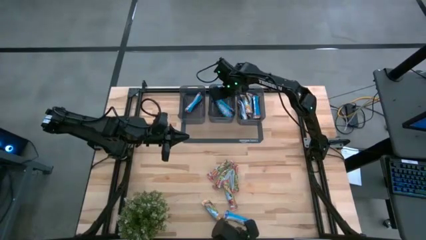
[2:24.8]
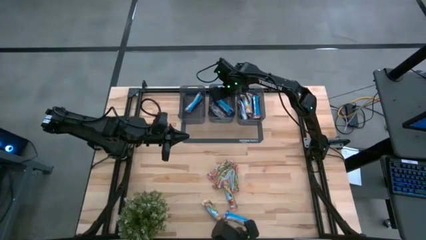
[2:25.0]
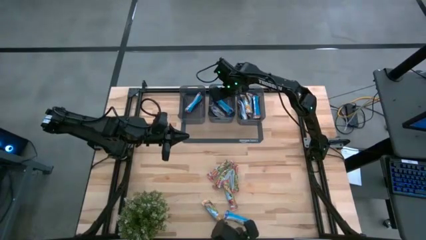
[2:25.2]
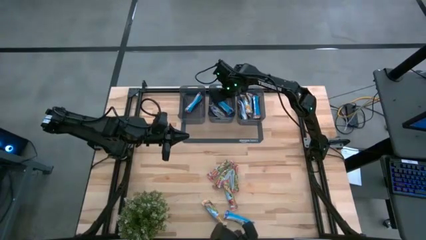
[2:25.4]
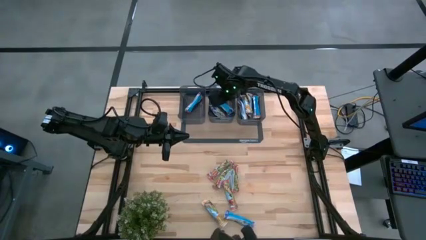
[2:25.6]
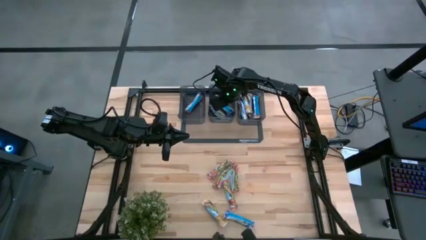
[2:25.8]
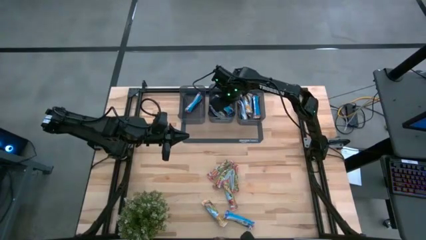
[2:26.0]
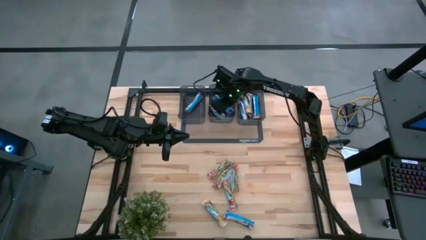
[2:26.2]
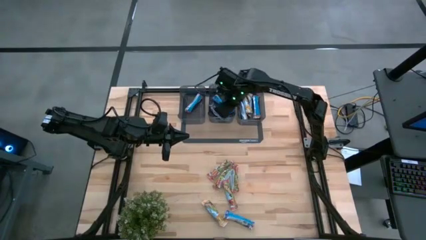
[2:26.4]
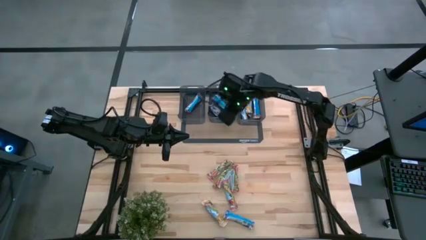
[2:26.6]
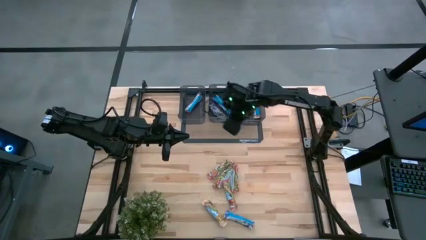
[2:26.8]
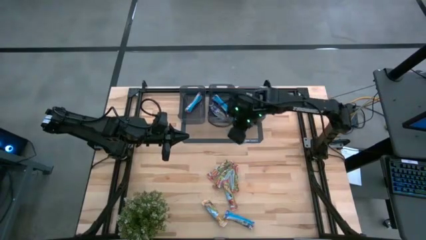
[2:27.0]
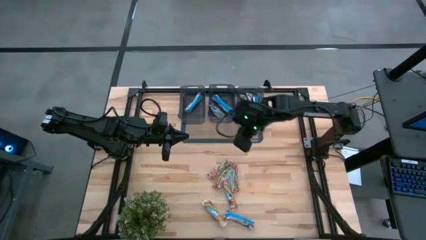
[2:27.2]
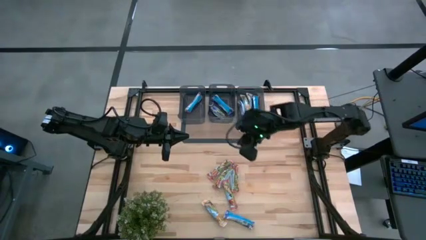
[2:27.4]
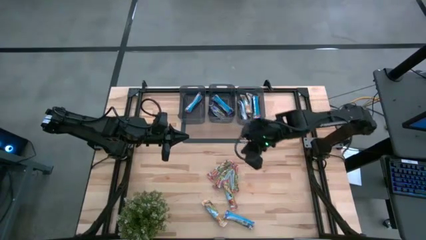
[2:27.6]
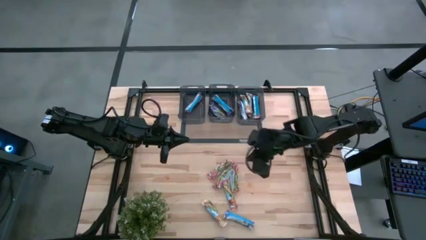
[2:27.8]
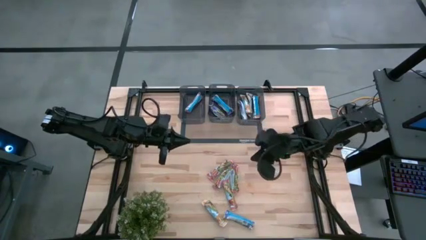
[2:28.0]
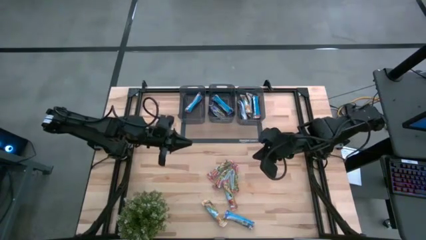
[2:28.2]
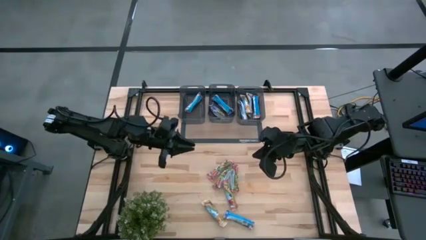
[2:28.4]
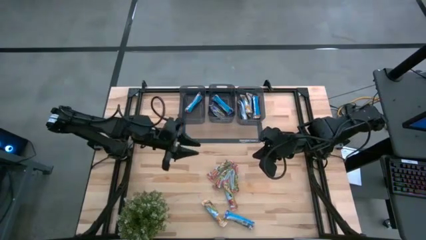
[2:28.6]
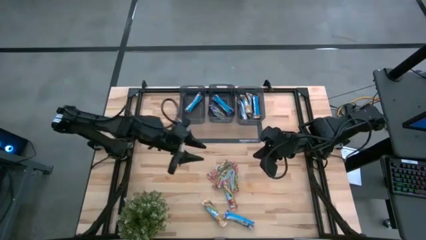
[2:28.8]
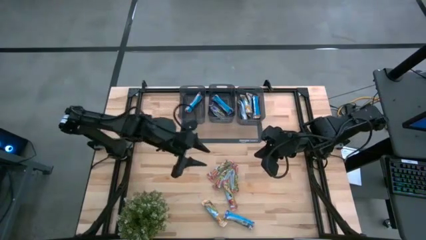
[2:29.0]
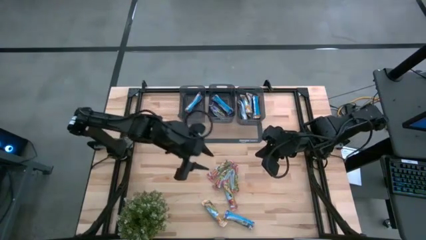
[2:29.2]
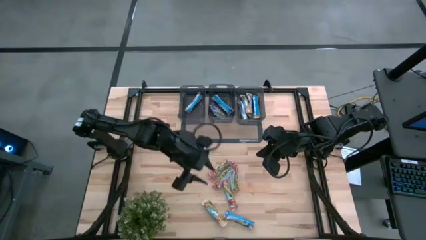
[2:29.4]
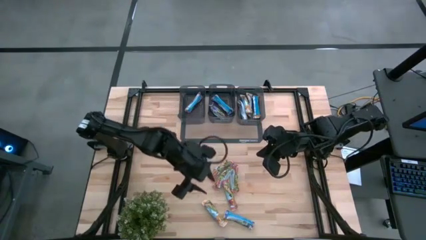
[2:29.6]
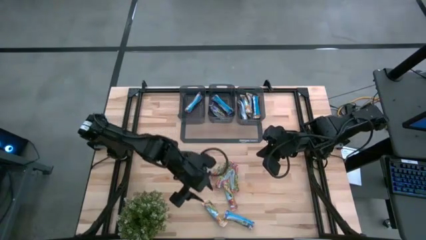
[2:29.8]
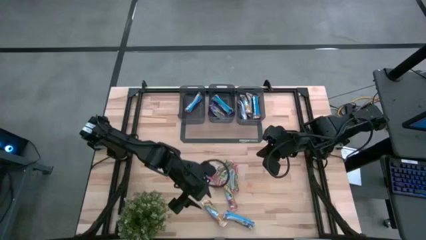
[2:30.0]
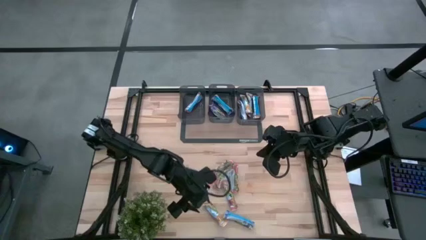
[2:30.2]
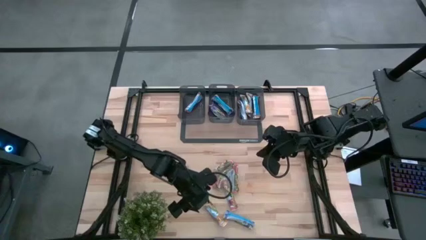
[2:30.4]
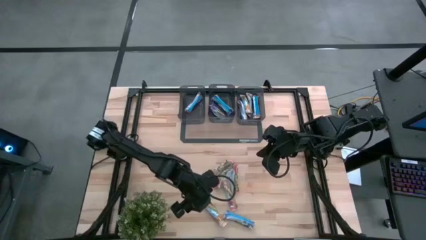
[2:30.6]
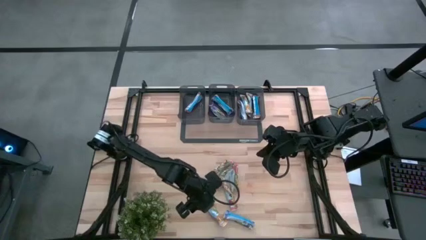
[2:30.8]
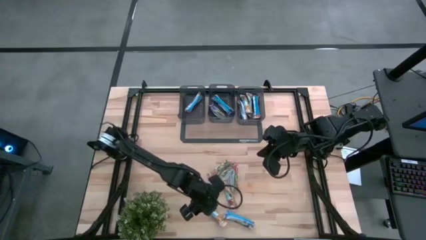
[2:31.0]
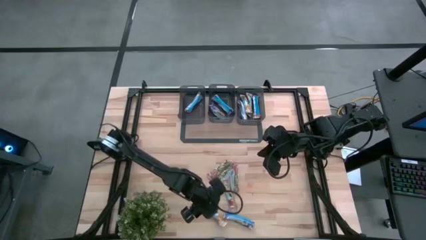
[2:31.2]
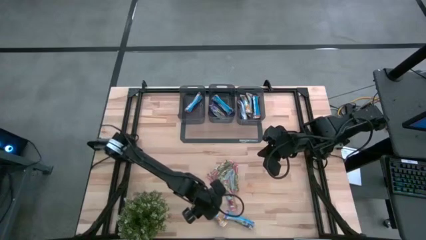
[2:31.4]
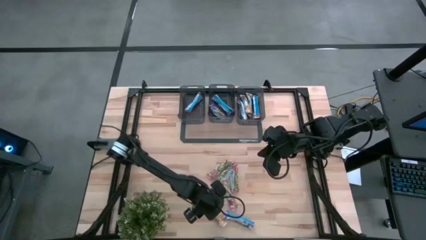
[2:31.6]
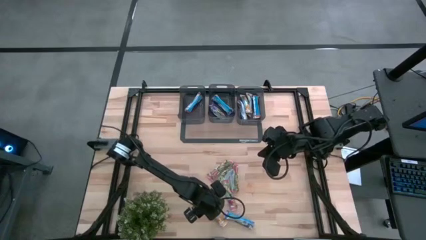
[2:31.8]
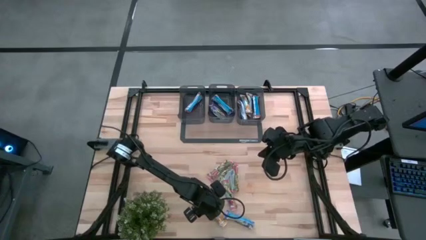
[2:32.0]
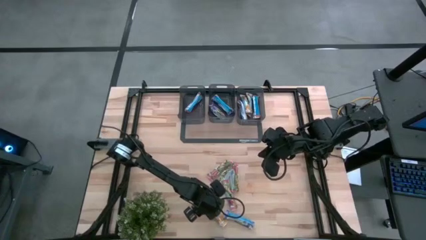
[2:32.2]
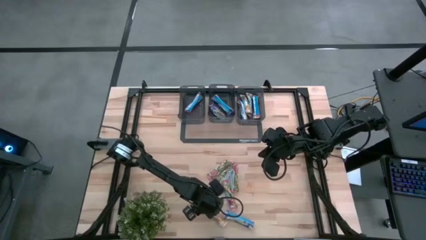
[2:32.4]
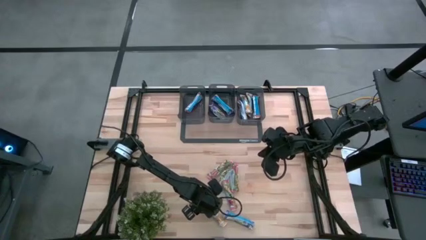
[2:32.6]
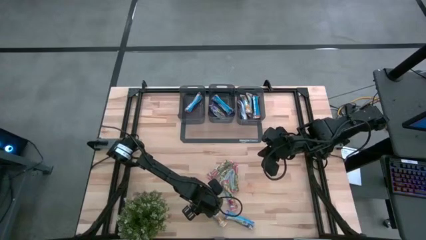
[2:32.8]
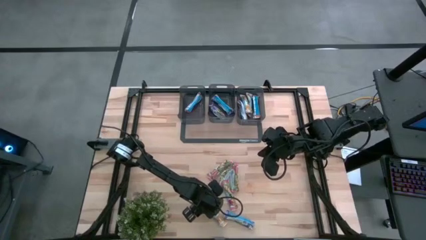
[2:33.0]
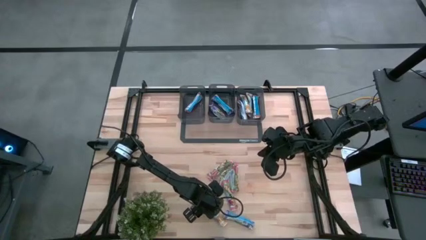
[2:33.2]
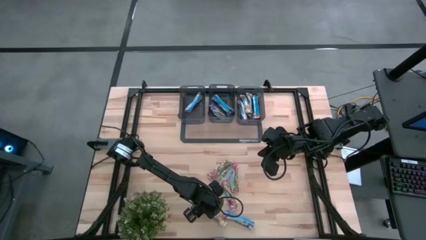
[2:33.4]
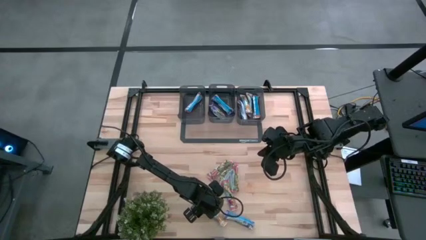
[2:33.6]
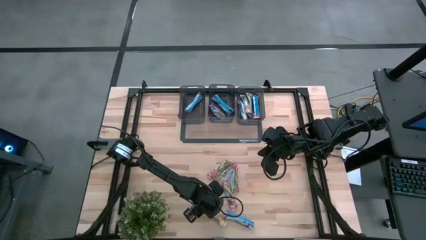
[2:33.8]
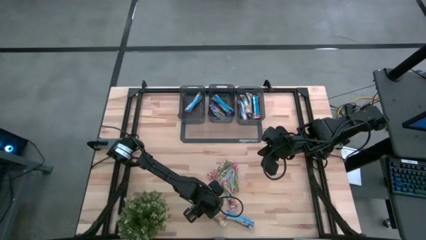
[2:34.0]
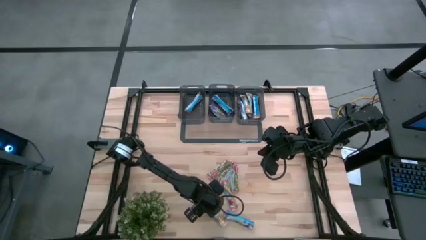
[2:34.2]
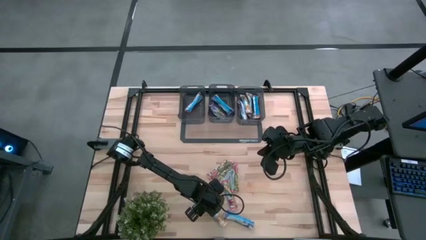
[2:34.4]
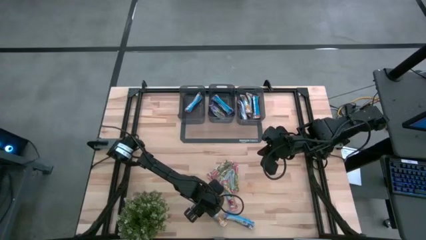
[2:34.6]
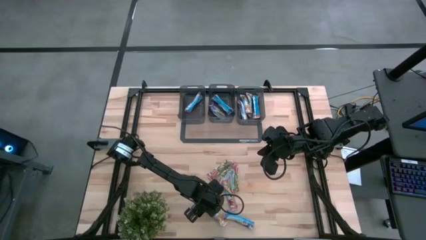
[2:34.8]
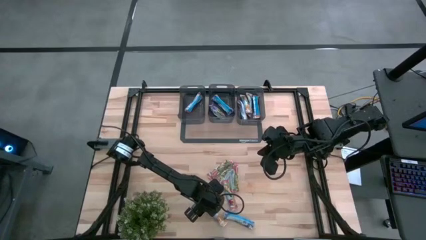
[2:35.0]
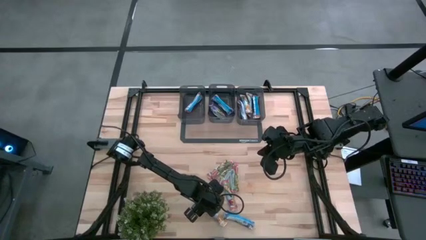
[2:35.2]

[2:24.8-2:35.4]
Task: Pick and place Granola Bars by type
Put the yellow granola bar into the right black bin

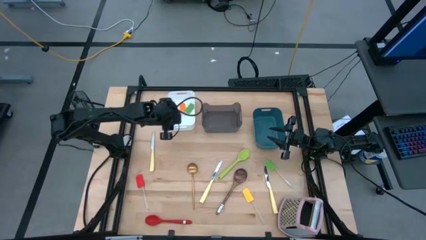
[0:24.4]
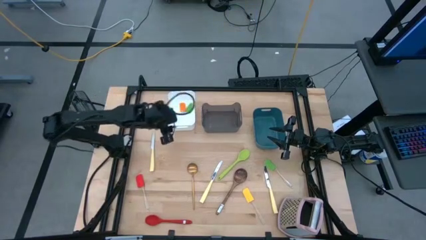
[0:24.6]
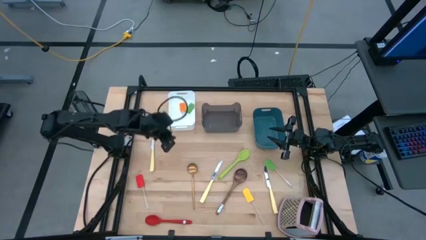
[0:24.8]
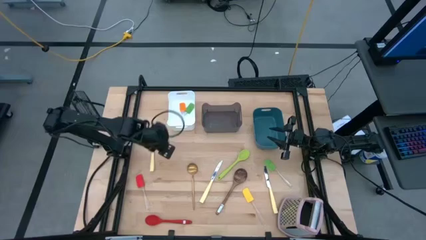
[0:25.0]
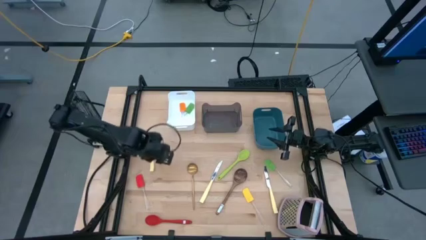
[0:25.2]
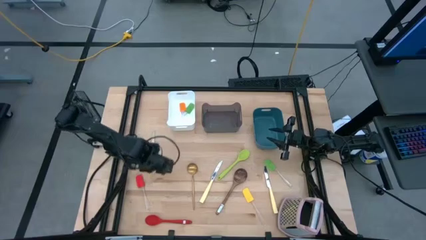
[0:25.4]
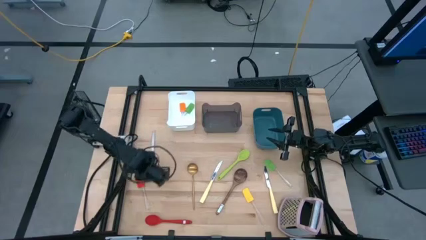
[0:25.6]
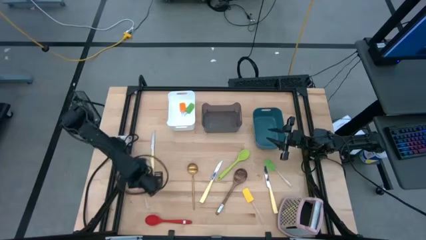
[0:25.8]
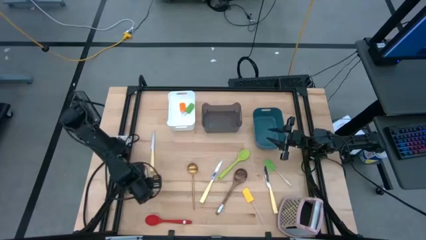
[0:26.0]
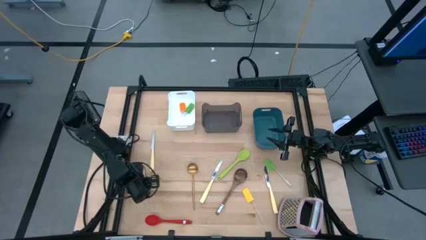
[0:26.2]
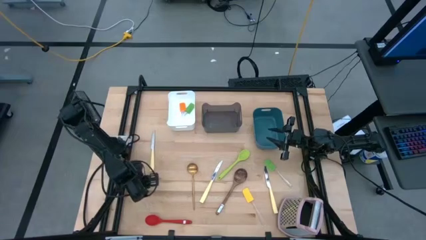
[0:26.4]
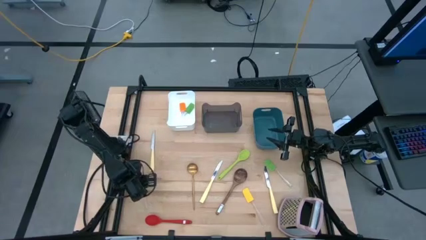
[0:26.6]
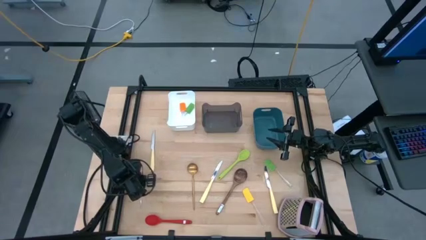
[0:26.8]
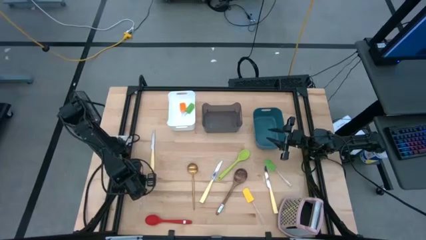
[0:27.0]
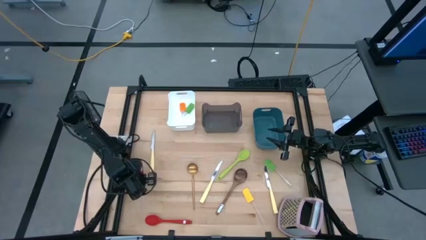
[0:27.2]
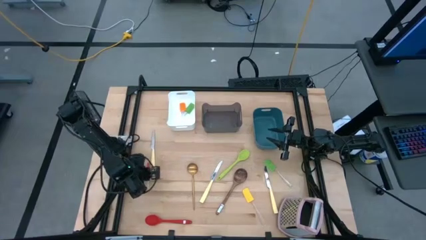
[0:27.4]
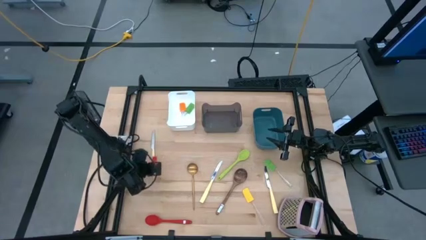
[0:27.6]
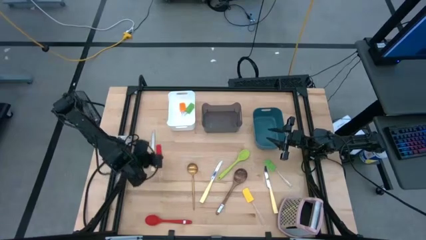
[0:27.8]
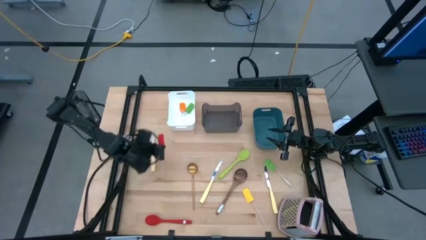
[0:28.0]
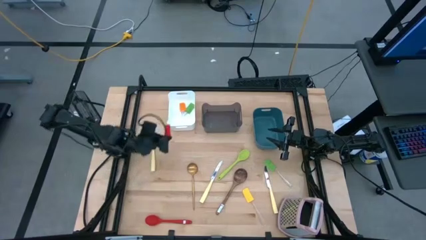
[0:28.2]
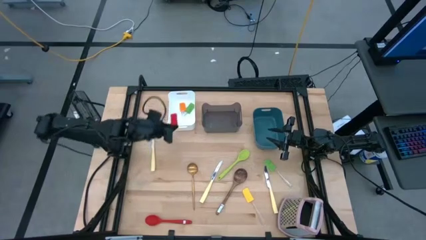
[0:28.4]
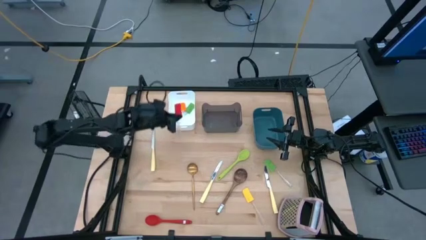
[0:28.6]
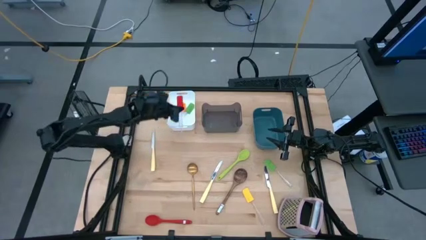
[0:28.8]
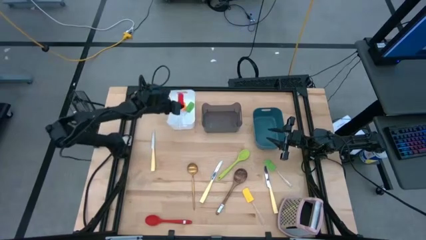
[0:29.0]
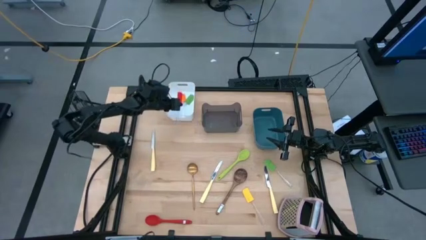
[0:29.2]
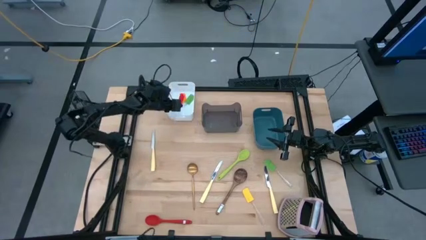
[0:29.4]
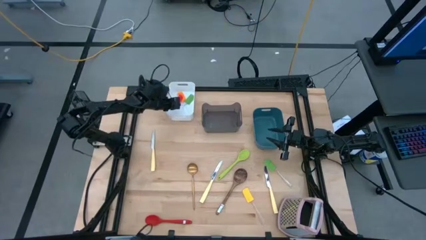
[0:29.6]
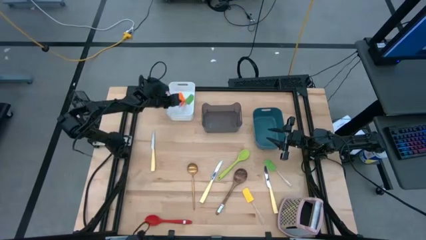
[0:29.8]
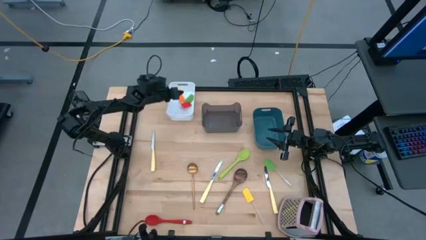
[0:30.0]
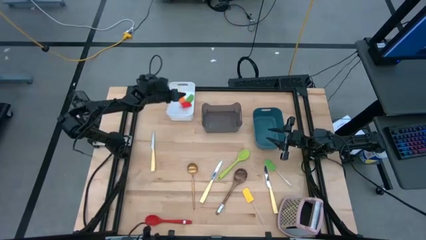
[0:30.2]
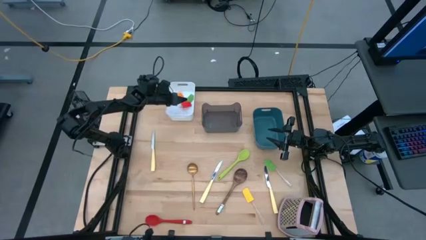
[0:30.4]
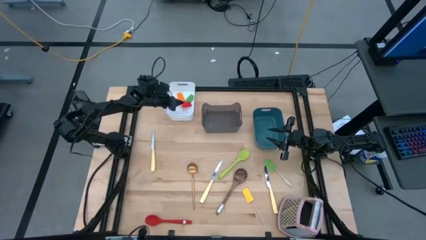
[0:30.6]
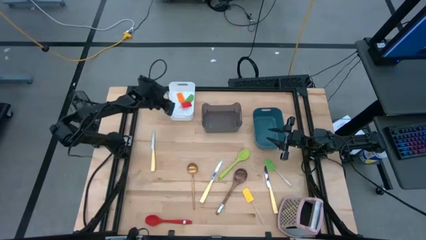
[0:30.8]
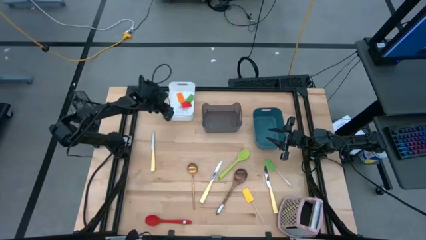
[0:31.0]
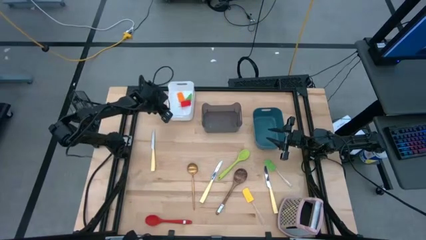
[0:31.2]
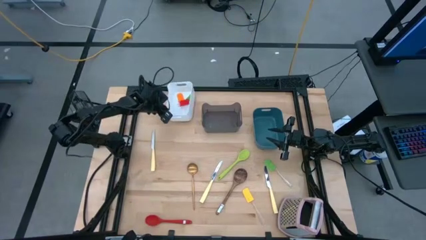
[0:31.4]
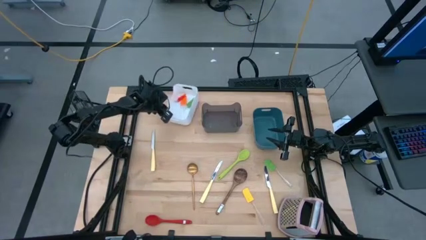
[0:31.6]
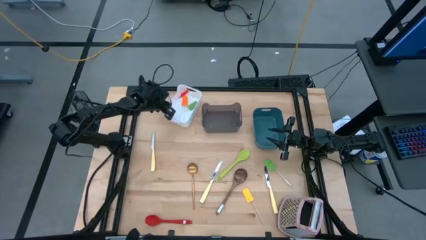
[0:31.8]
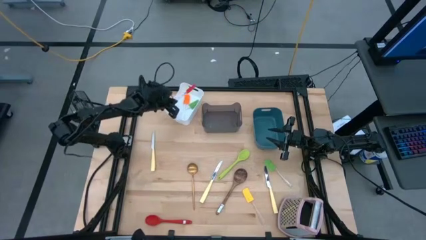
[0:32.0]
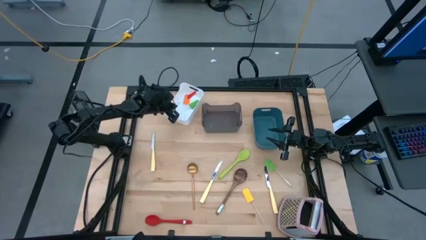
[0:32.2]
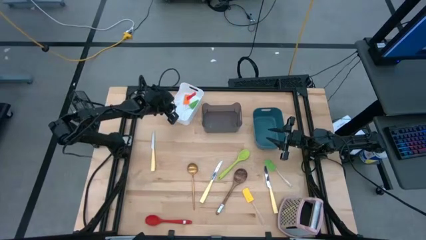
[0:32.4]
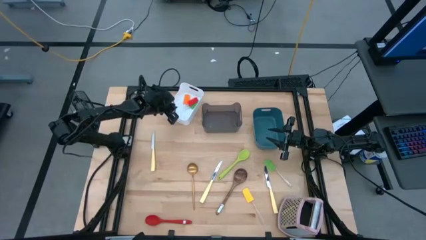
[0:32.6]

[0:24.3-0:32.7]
Task: Pick & Place Kitchen Items
Put the red spatula into the white bin
